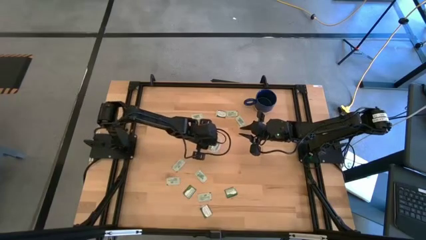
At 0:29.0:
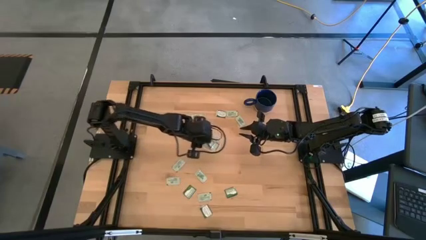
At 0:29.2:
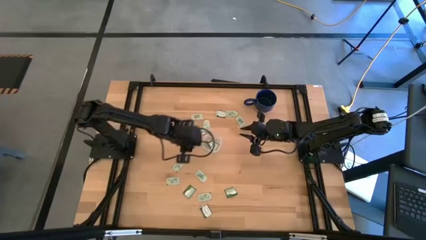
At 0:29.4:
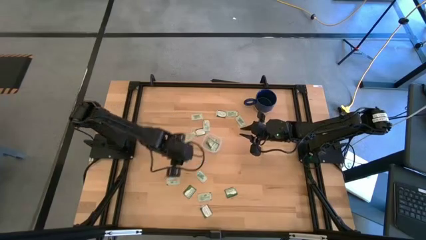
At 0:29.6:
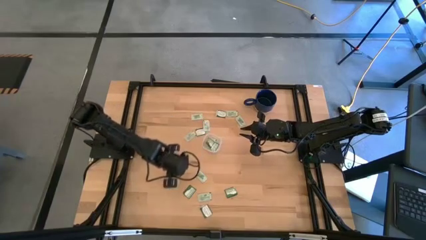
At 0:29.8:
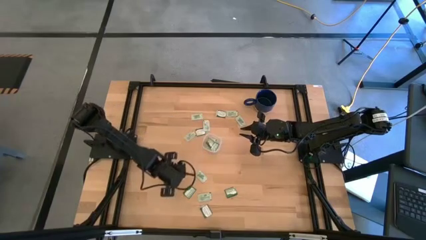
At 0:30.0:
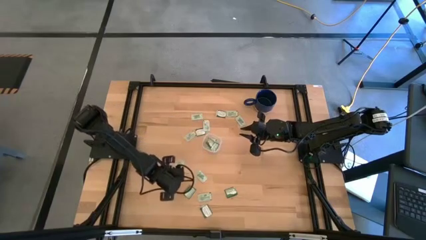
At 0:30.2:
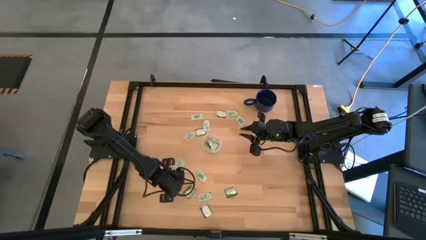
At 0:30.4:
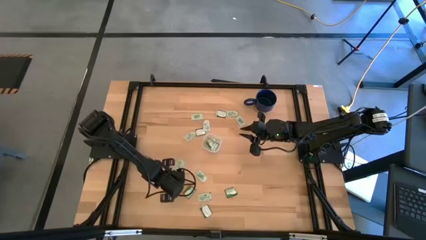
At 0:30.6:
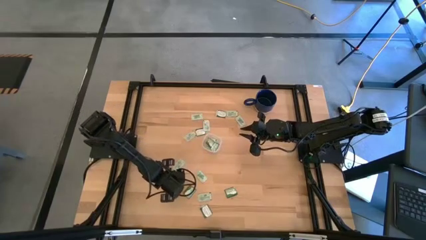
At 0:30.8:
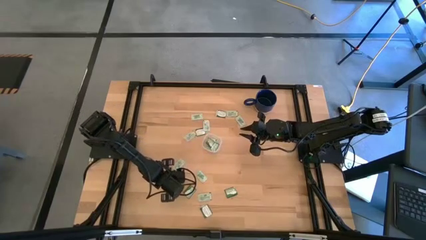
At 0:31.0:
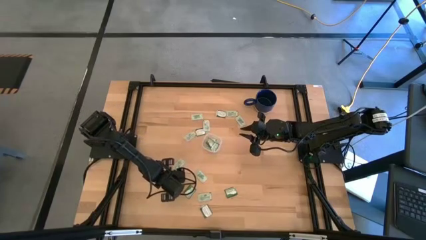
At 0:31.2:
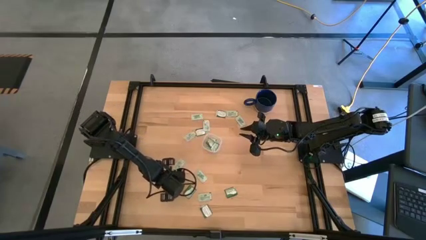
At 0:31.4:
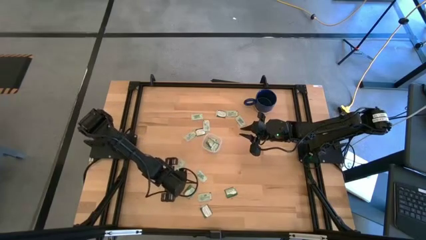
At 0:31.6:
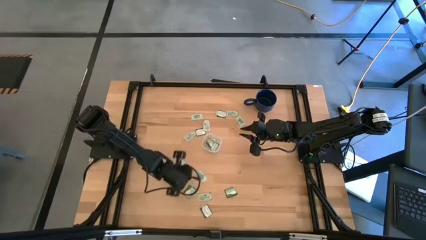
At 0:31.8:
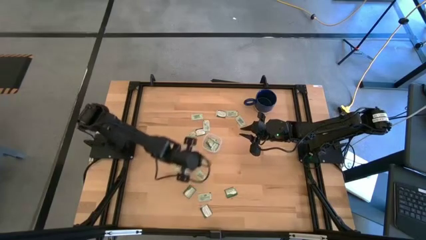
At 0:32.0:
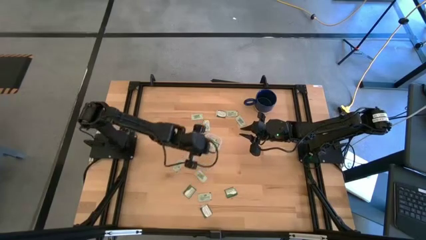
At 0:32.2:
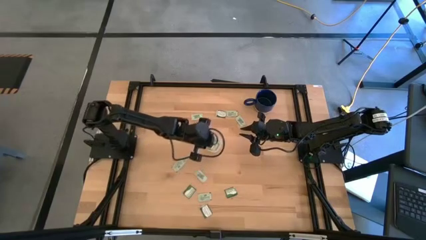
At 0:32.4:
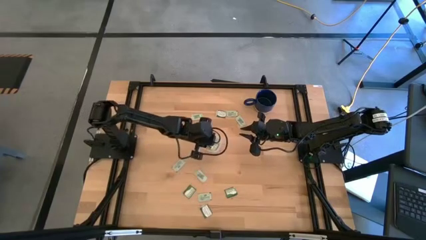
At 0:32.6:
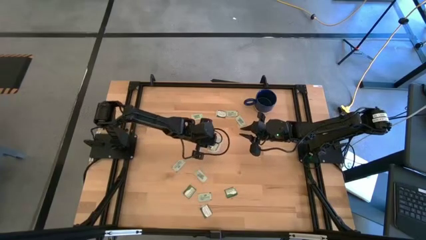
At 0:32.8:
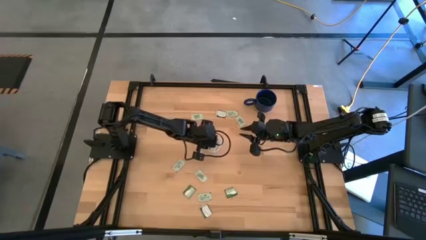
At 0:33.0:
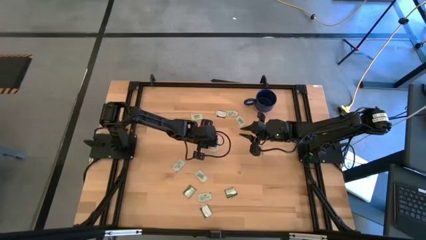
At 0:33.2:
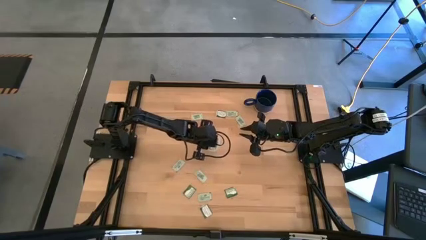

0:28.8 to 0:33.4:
Task: Pick and place Stevia / Truvia into bins
Put the light green stevia packet into the container

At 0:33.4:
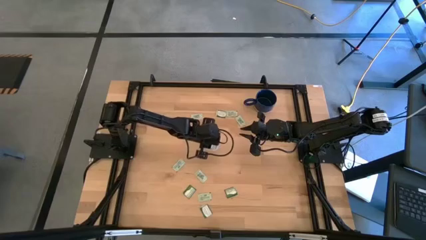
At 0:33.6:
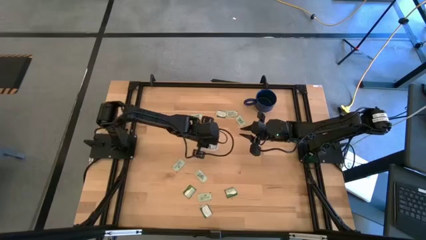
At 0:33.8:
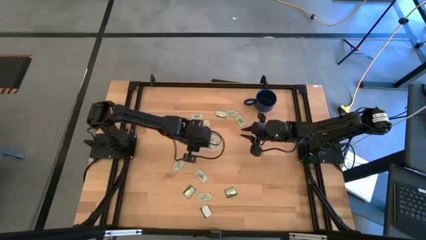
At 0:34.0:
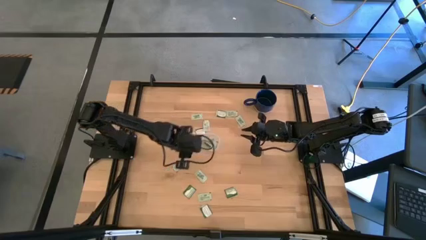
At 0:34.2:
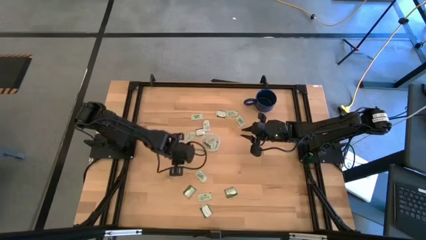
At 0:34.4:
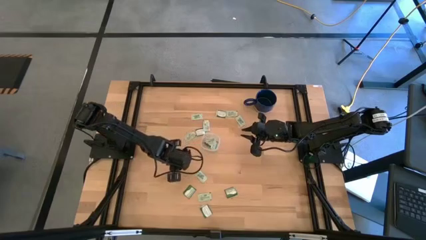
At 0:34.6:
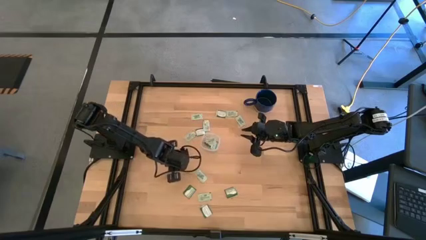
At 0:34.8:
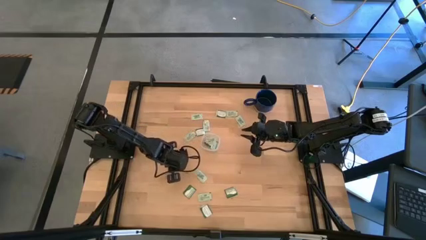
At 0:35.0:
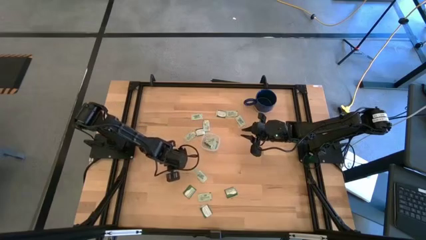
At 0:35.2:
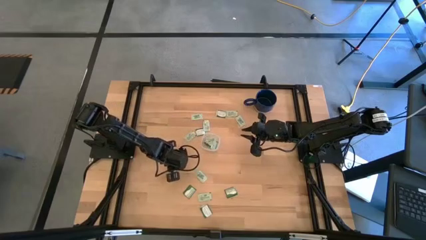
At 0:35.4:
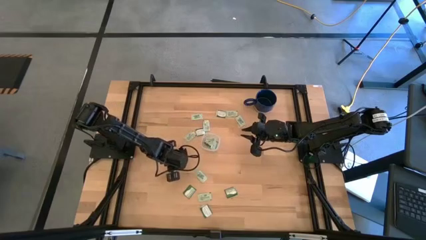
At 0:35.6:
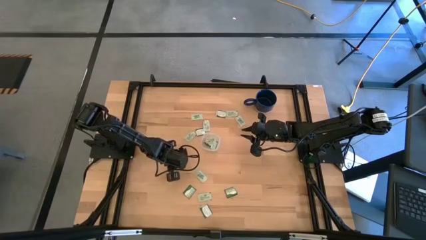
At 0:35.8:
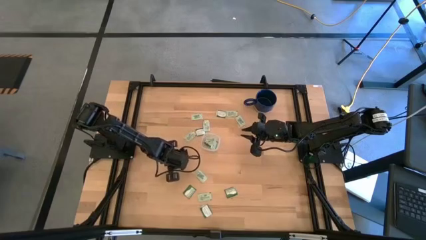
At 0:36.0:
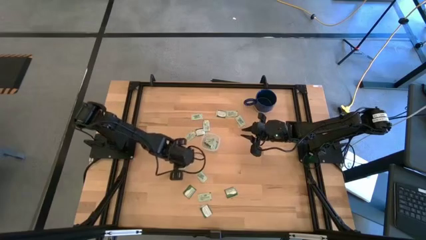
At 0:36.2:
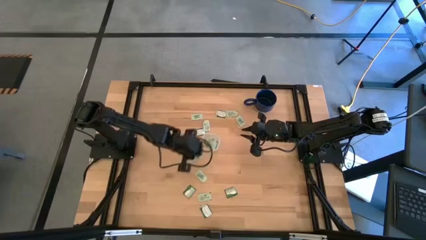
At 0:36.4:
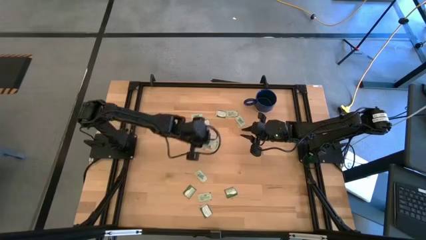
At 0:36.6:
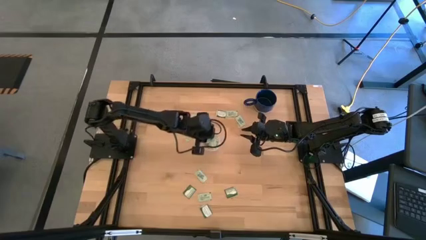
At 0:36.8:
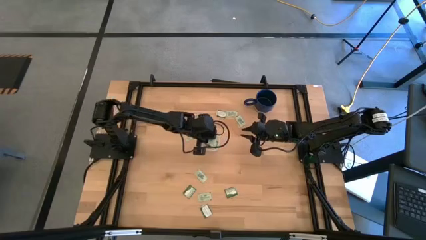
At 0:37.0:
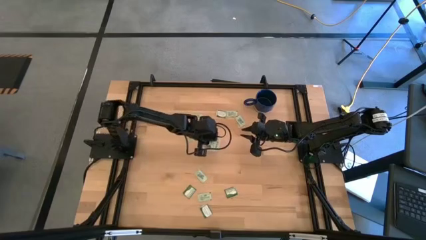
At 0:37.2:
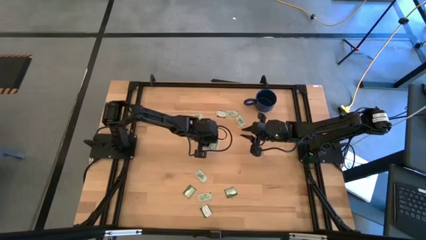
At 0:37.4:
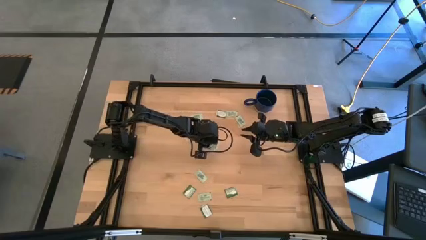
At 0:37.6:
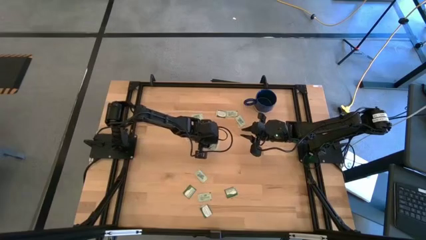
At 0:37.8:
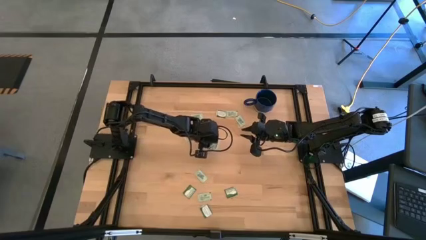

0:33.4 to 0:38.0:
Put the light green stevia packet into the container

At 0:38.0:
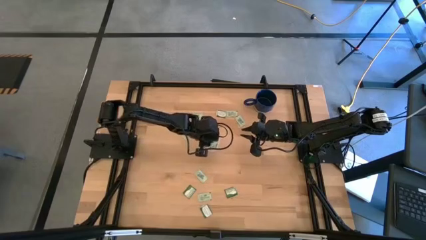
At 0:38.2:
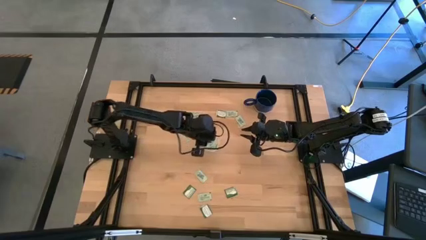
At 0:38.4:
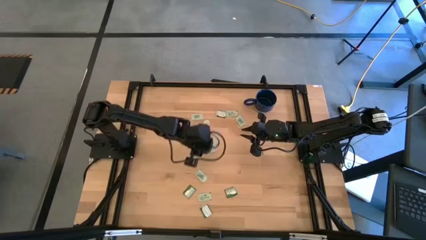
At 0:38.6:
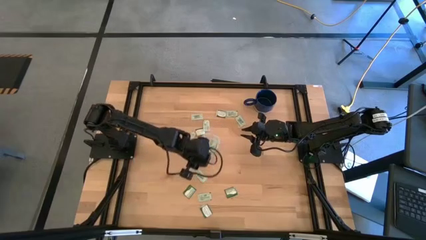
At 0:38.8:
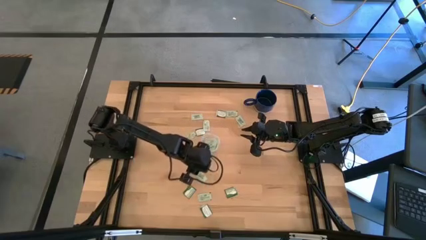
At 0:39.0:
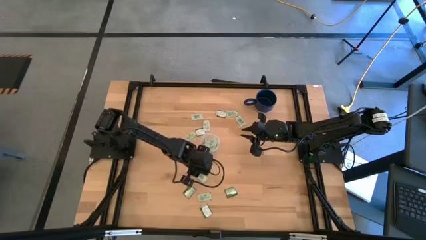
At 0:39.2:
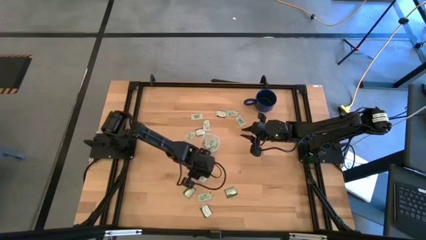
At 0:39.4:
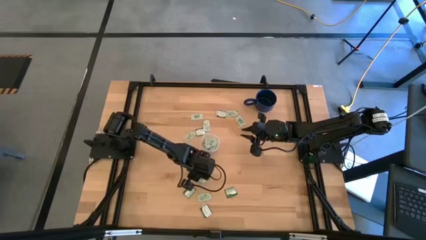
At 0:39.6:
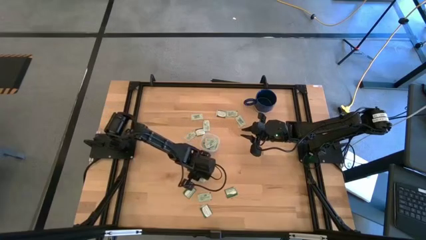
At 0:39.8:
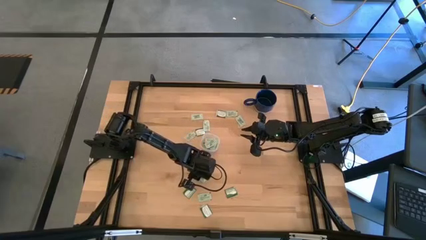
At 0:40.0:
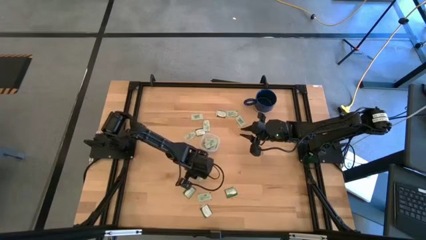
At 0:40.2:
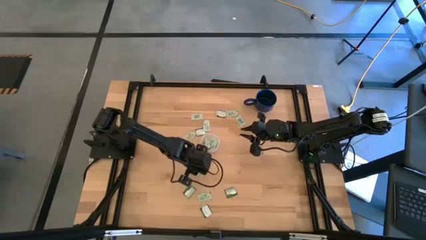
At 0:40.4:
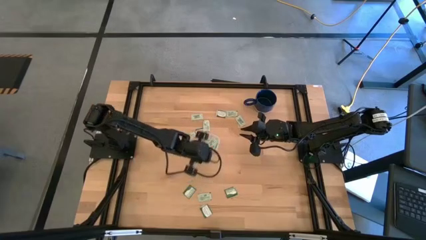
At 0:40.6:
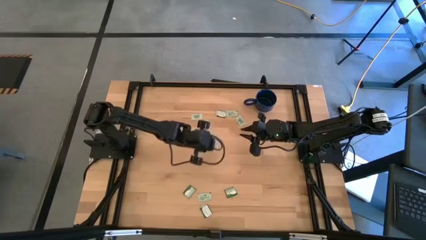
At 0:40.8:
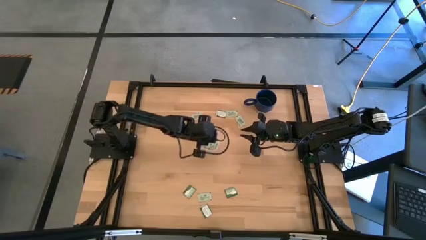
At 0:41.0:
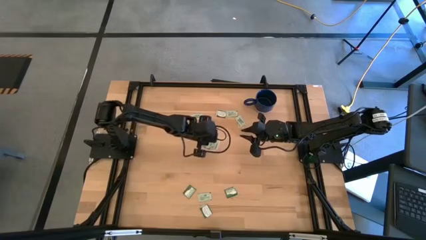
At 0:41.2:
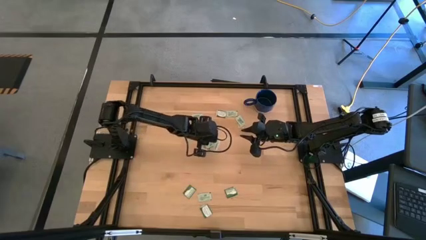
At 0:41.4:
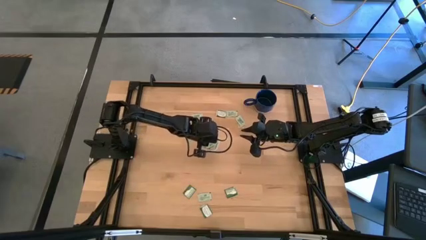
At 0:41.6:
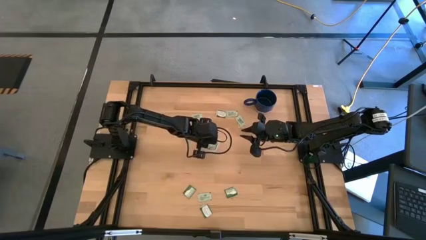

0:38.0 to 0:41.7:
Put the light green stevia packet into the container

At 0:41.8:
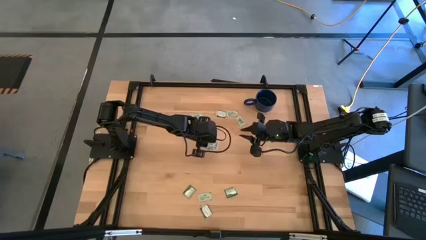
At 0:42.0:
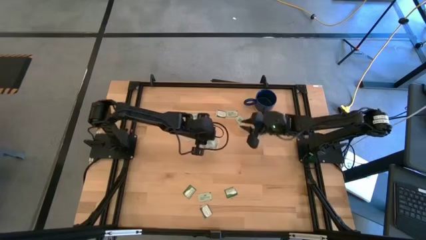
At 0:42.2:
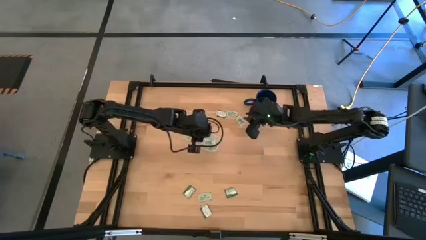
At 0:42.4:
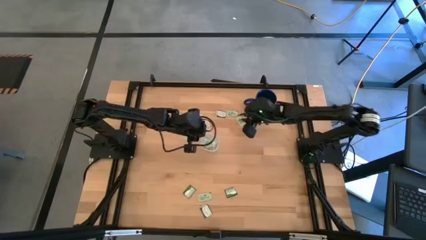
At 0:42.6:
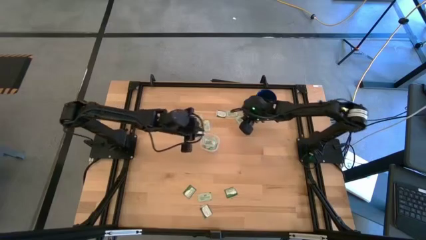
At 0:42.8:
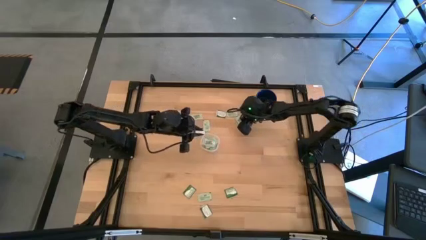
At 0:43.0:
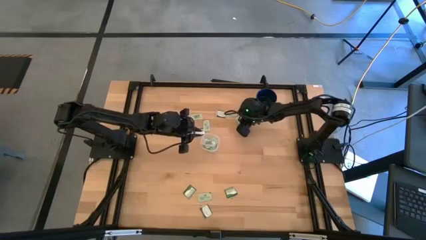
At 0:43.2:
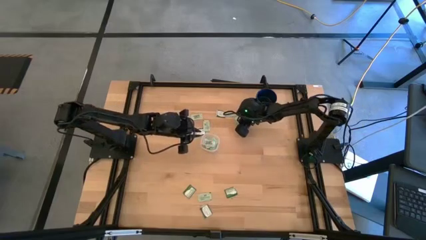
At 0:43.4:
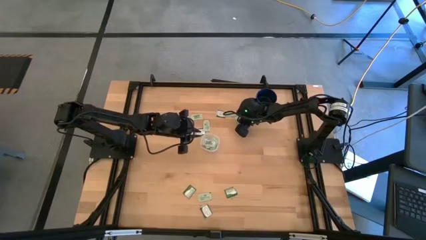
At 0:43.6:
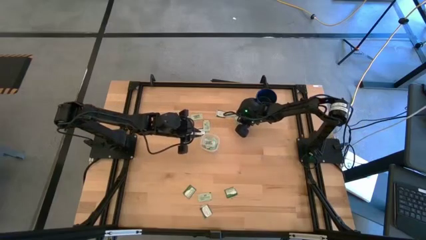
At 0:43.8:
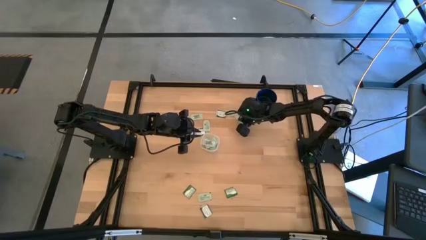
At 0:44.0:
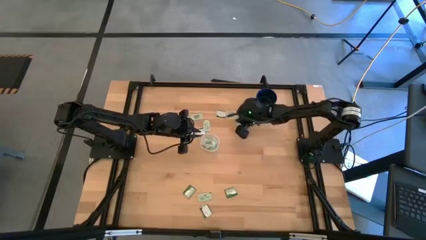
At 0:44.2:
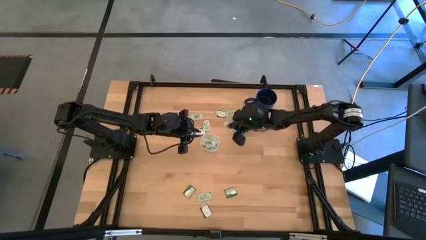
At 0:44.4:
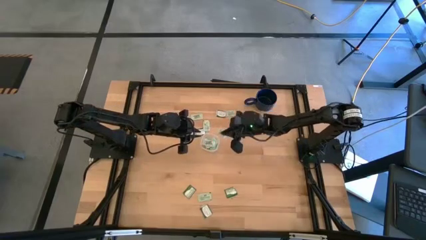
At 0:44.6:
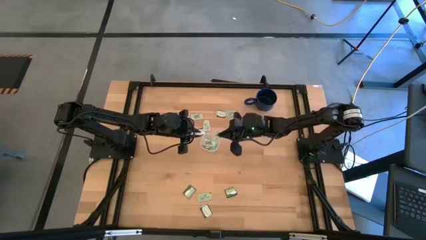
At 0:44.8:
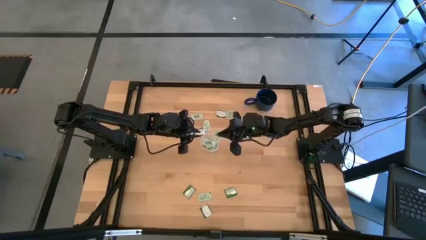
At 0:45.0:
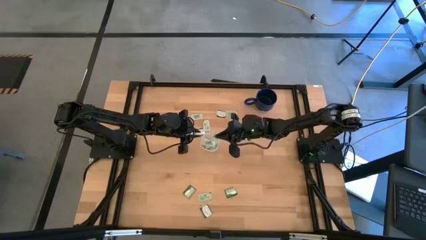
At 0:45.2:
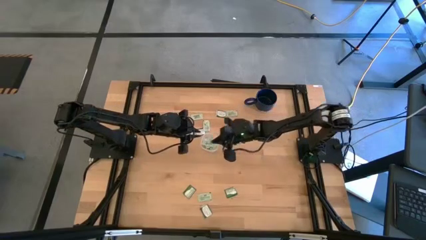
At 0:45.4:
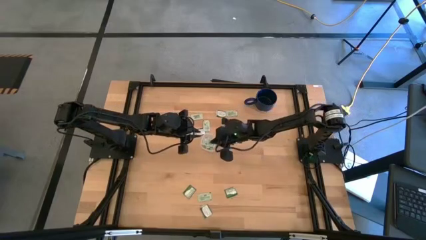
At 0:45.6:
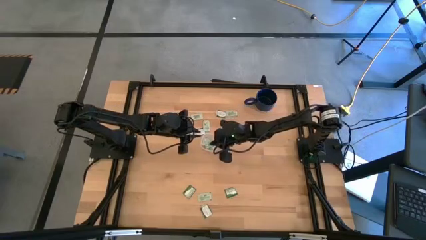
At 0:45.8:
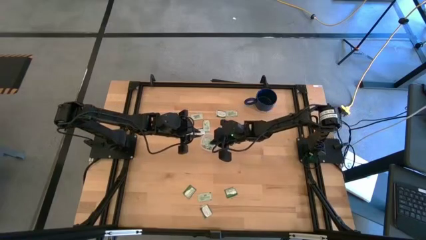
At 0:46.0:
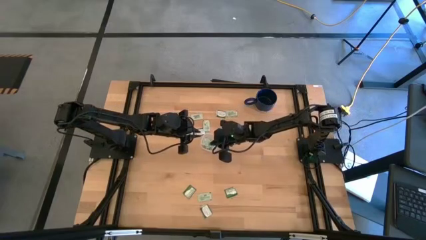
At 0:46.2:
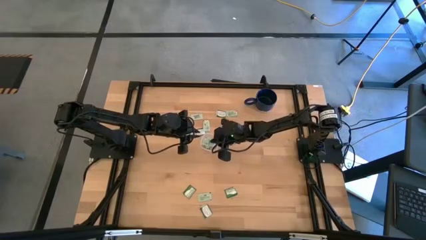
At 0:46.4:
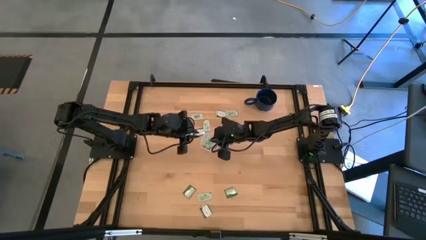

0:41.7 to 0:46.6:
Put the light green stevia packet into the container
